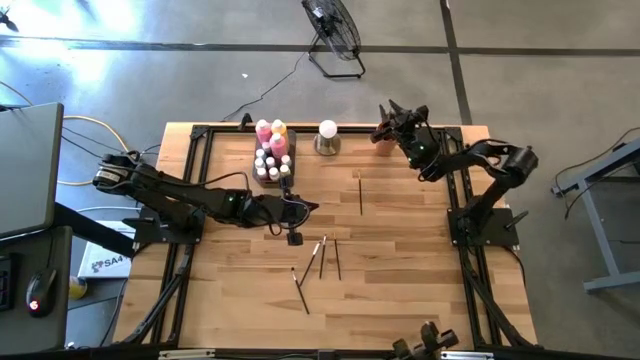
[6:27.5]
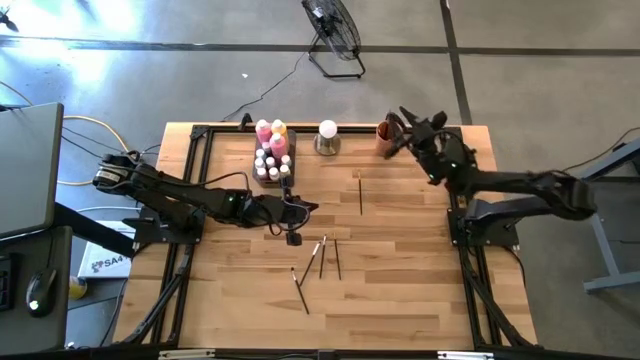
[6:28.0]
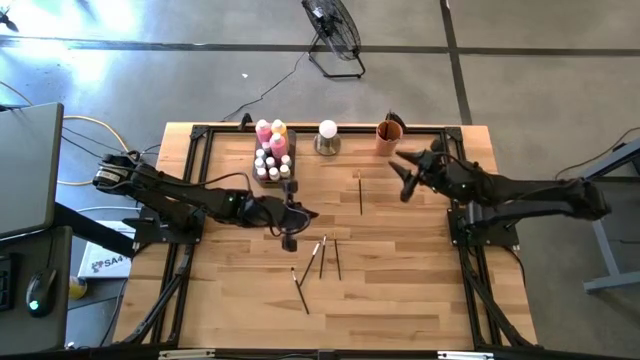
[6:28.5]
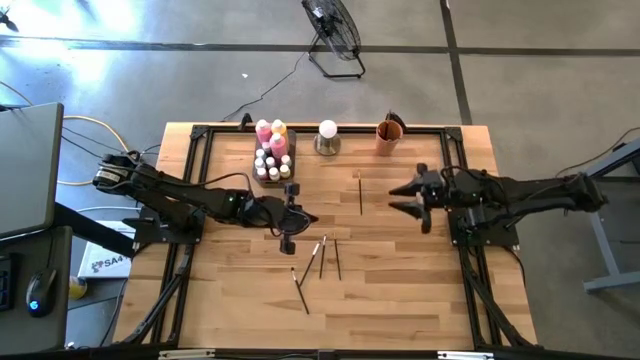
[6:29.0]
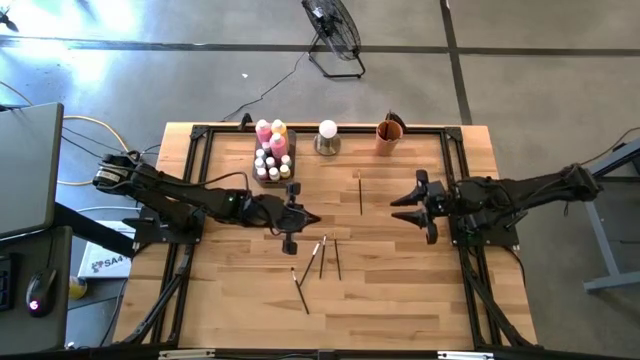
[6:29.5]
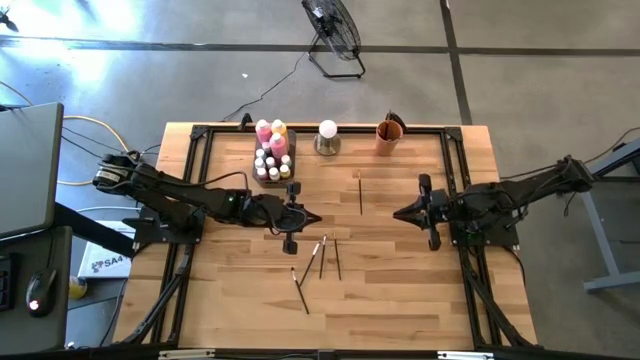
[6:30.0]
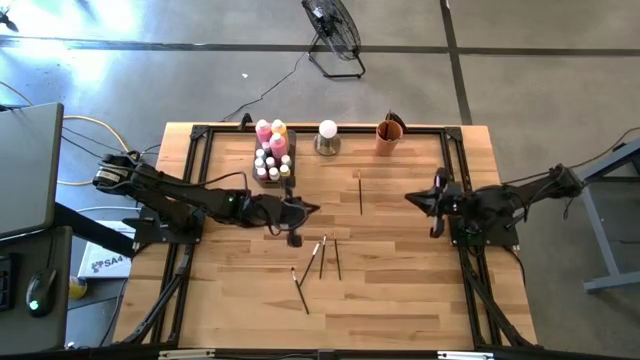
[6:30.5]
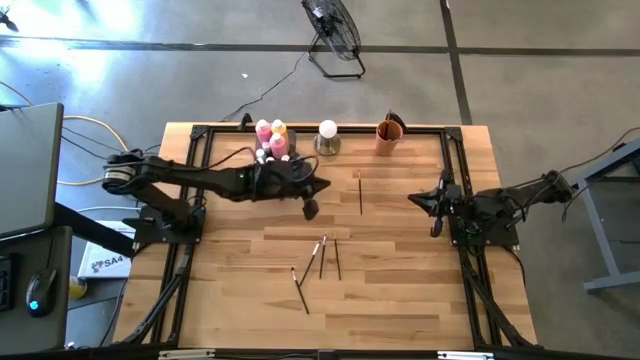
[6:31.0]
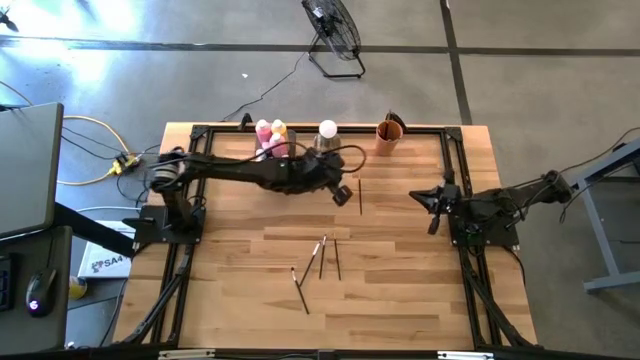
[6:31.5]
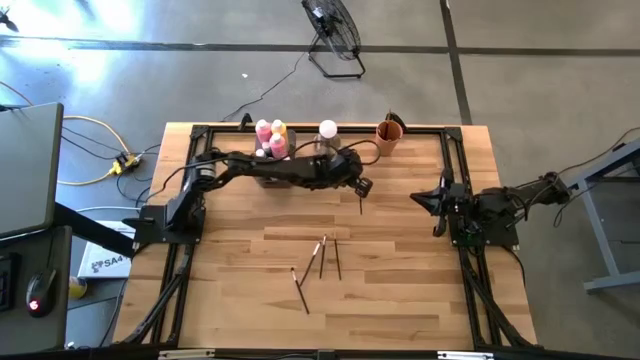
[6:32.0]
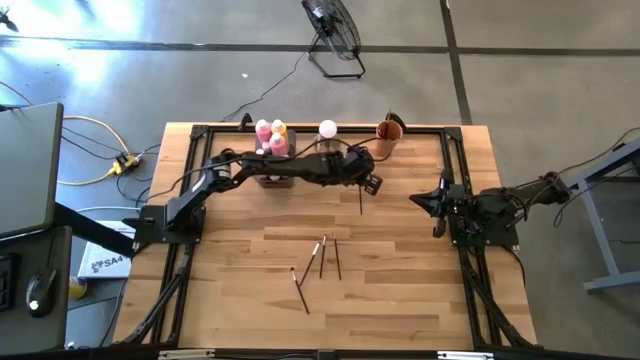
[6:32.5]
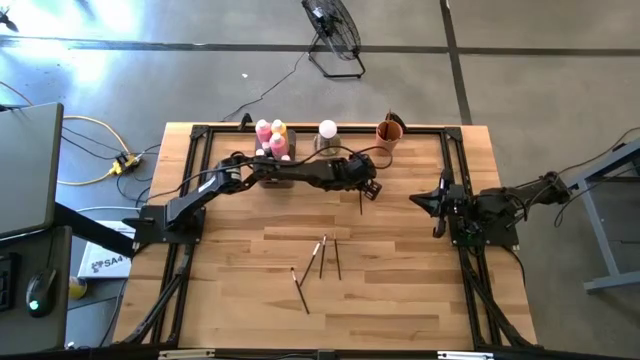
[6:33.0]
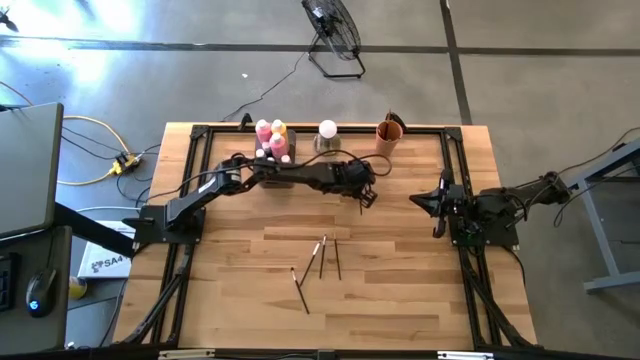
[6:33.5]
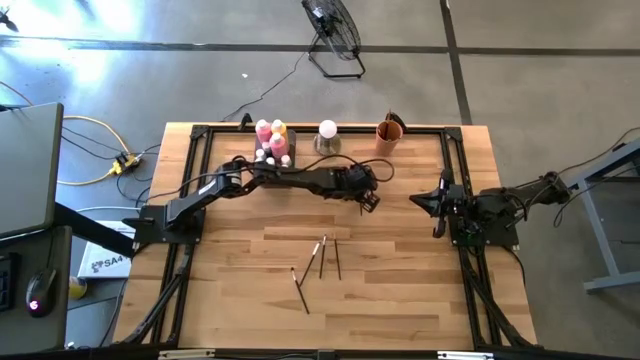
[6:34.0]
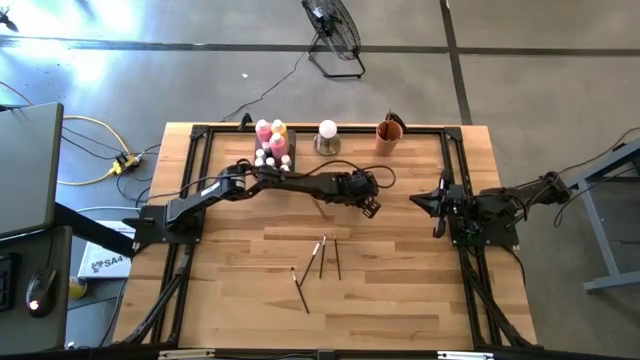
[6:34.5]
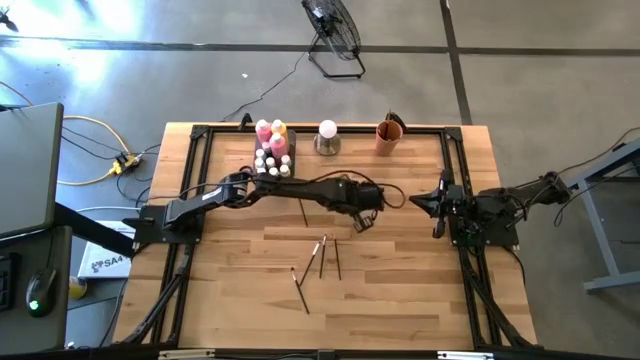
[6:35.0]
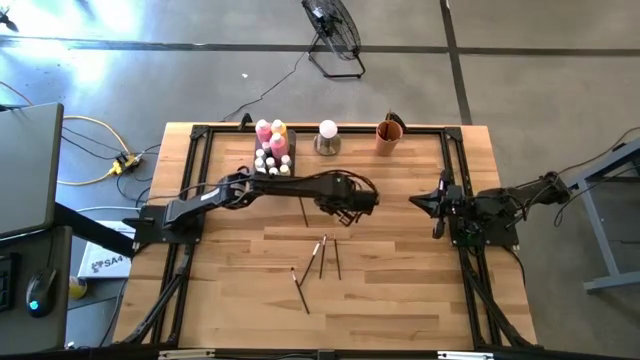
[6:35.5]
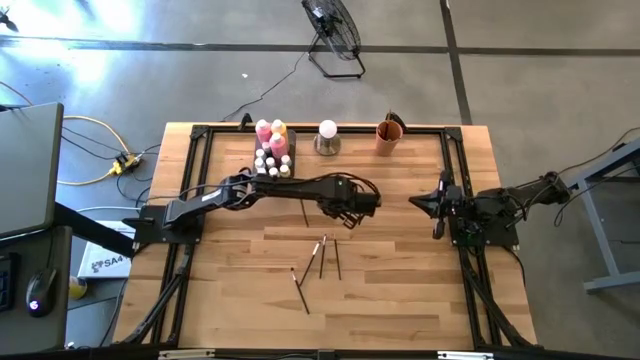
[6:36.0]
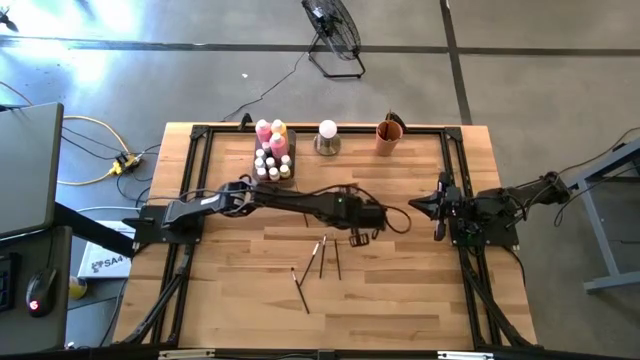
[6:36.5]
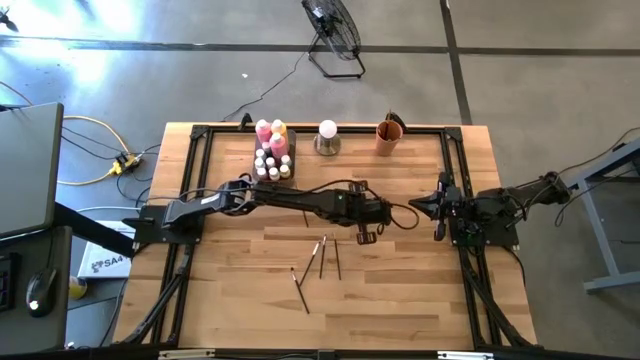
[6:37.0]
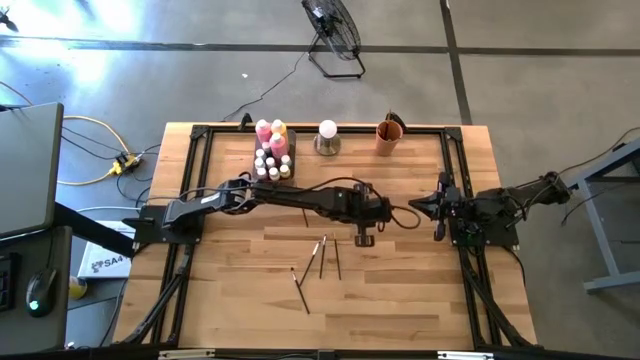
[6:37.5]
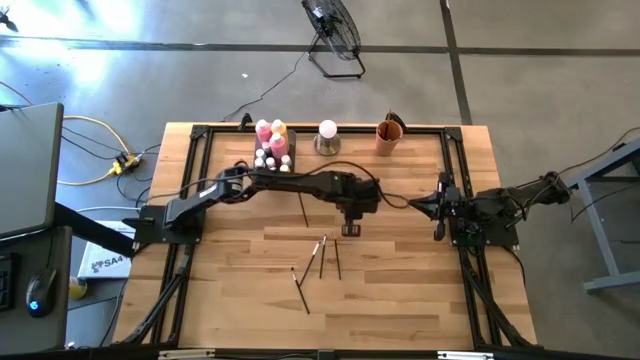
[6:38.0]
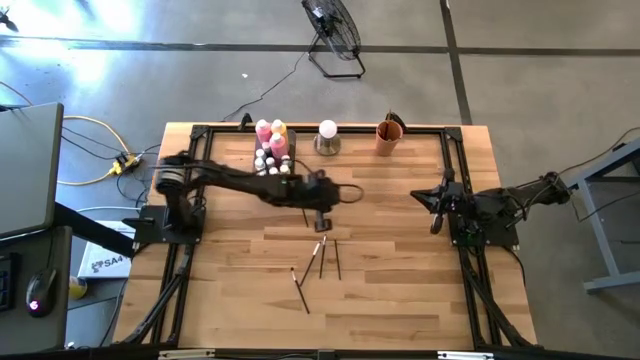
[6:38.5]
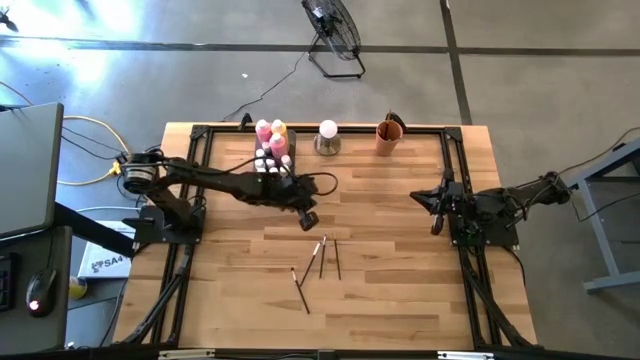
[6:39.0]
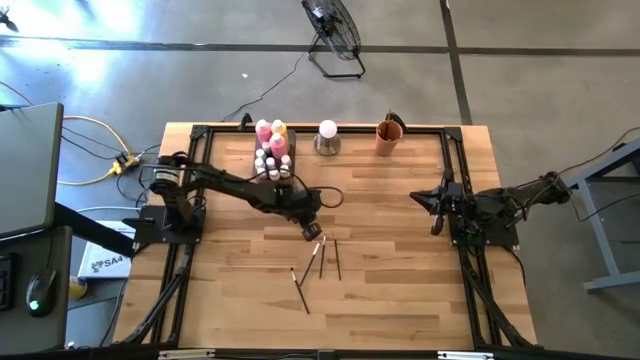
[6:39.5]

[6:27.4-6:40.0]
Task: Pick & Place Paint Supplies
Put the orange paintbrush into the orange cup

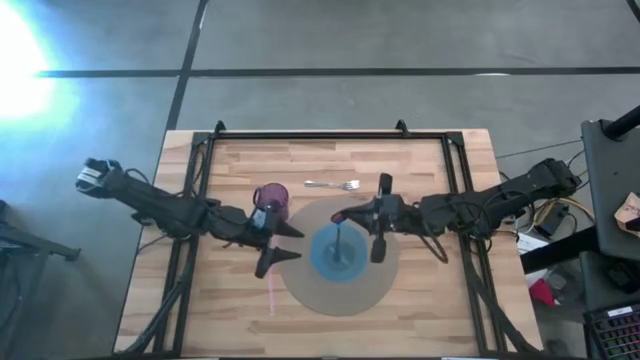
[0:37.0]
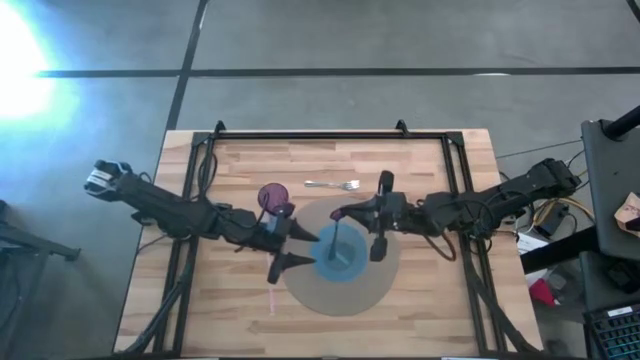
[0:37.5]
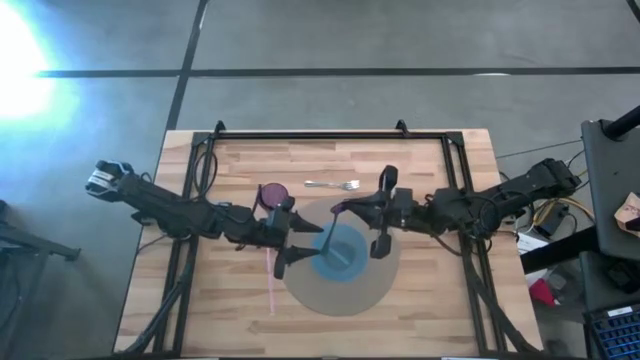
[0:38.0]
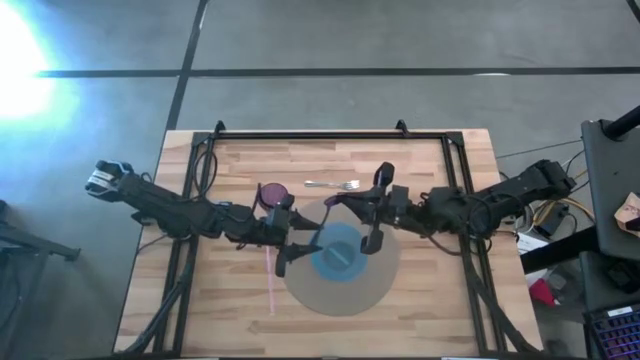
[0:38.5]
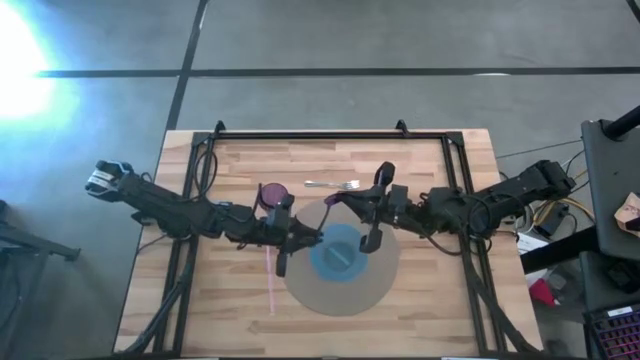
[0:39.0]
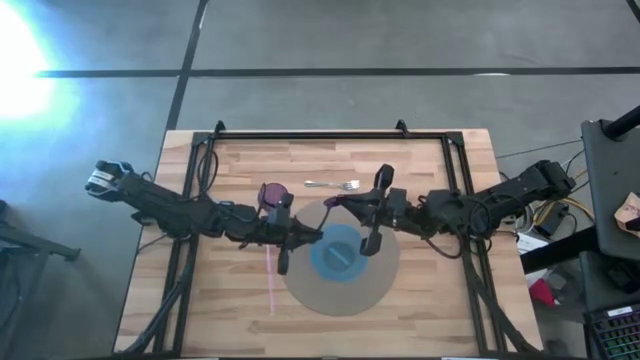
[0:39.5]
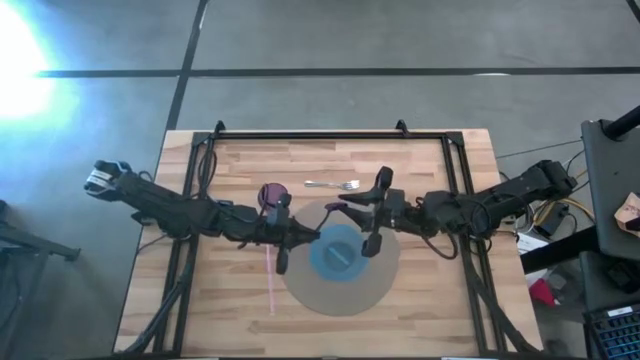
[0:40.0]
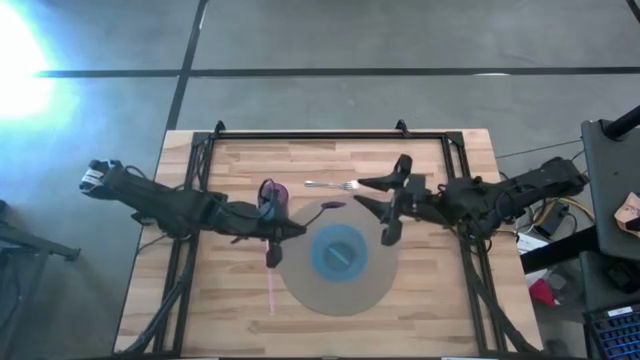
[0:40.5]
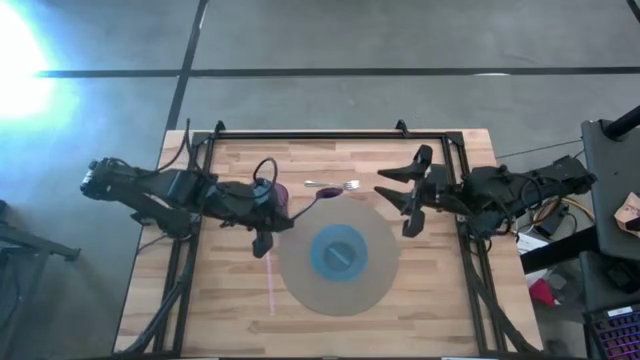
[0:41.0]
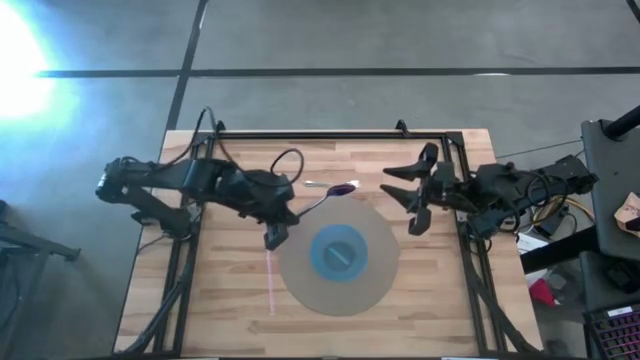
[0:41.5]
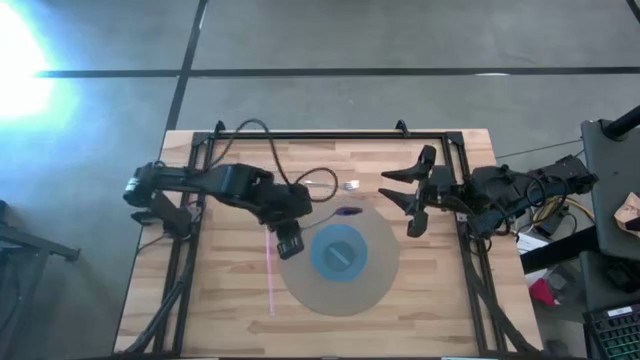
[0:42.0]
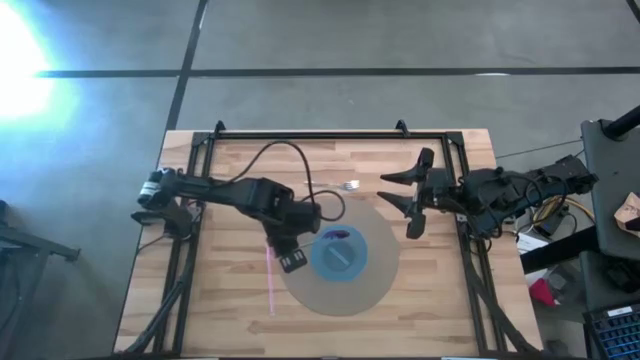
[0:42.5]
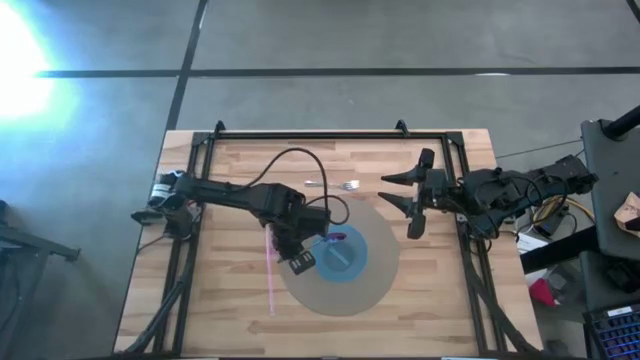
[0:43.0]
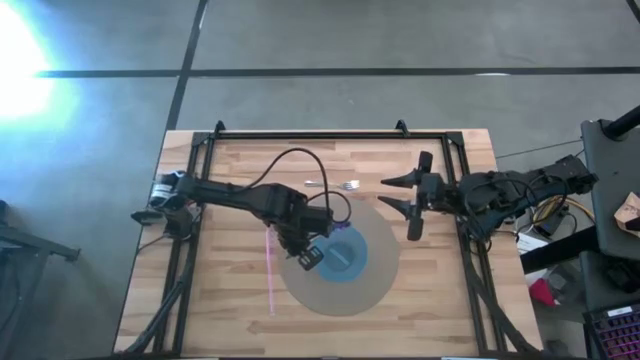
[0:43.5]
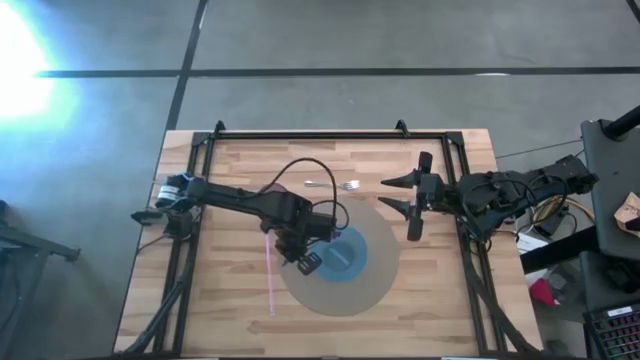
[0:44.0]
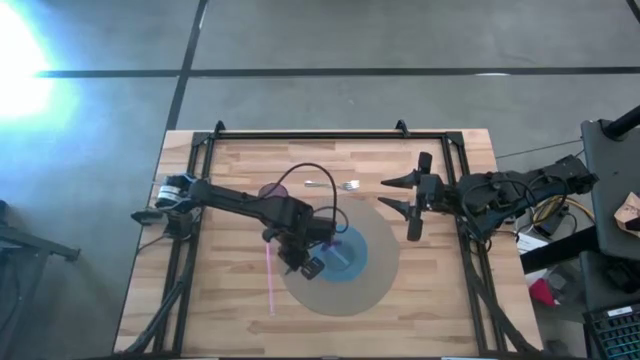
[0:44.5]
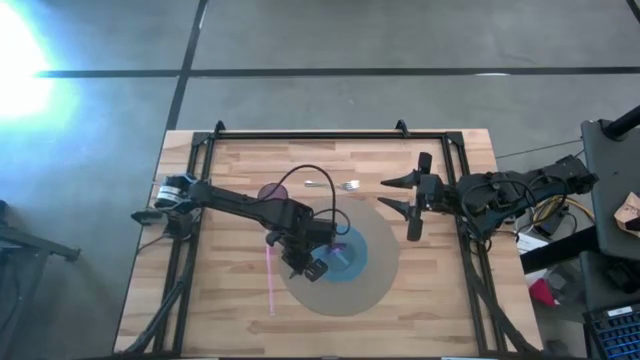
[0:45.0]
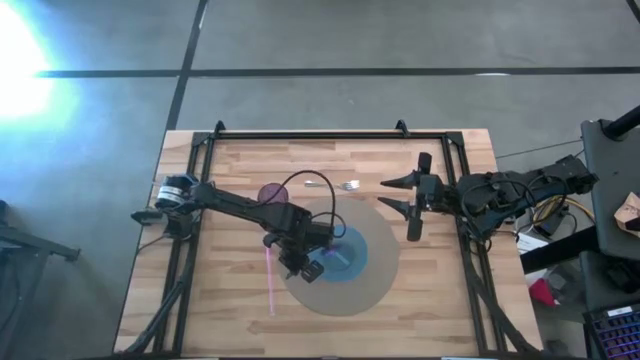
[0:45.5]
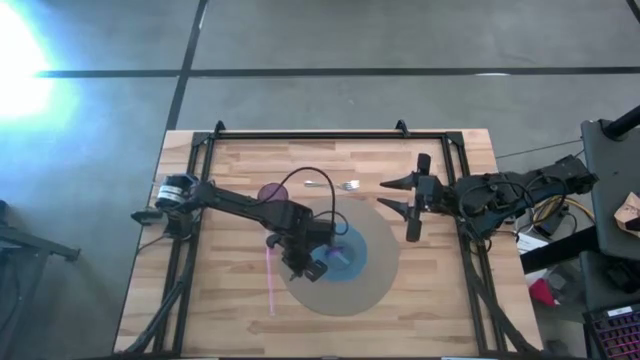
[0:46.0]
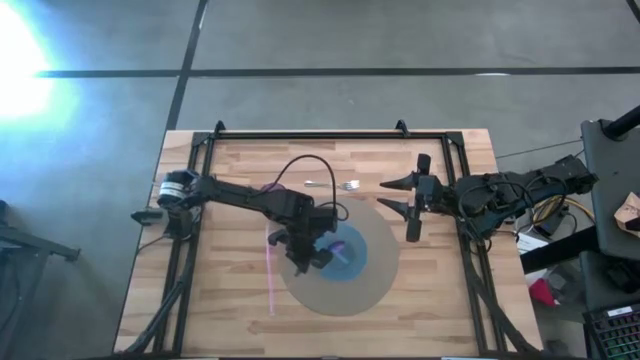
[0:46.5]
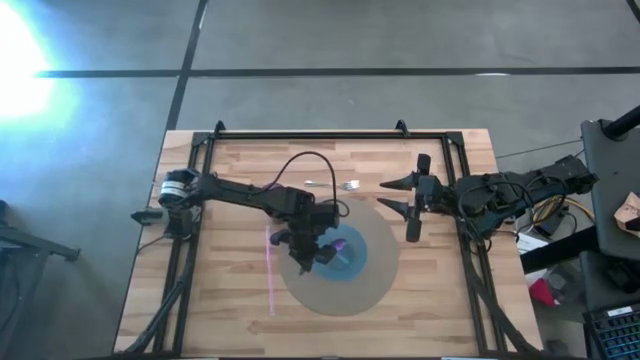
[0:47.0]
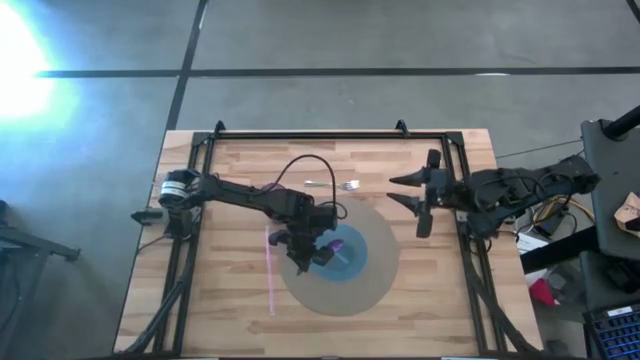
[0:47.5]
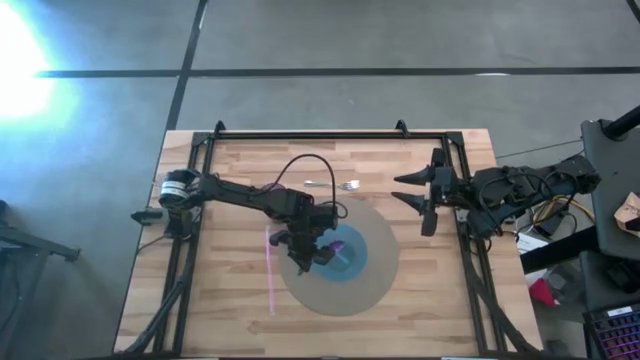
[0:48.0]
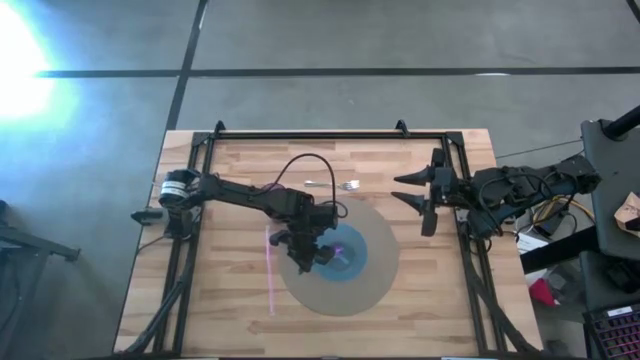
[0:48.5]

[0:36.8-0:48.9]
Task: Pick & Place Utensil
Put the purple spoon into the bowl
